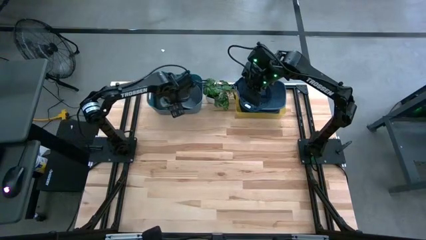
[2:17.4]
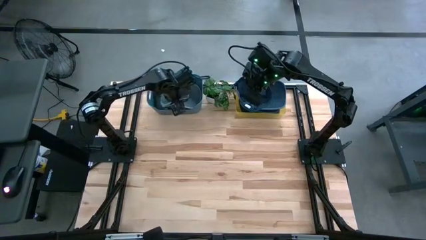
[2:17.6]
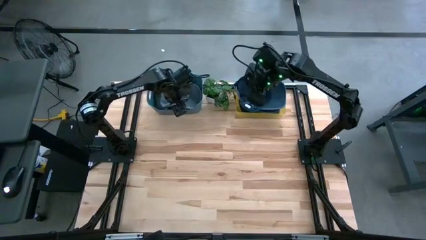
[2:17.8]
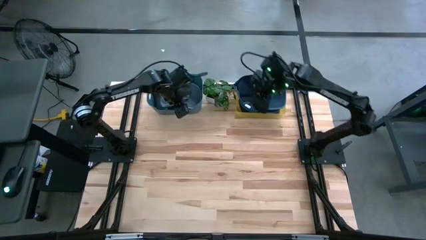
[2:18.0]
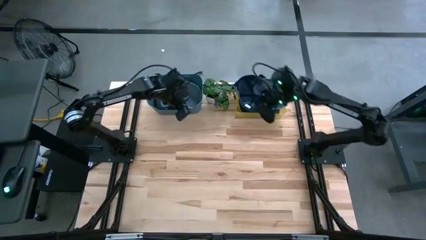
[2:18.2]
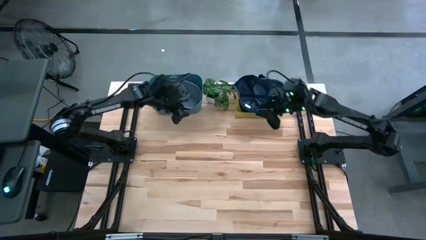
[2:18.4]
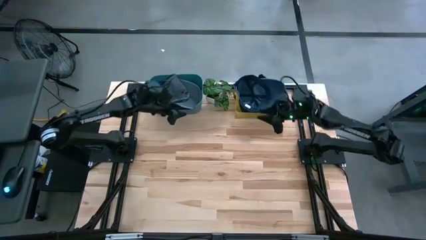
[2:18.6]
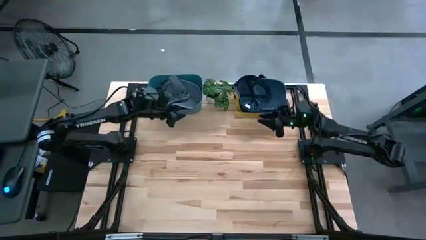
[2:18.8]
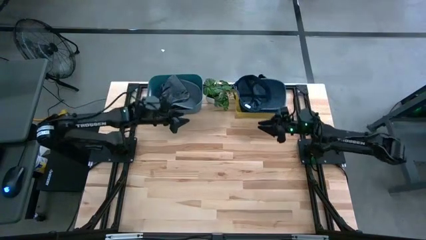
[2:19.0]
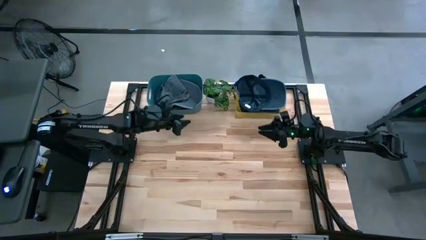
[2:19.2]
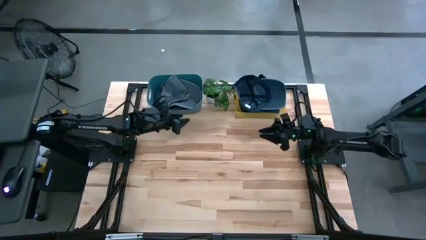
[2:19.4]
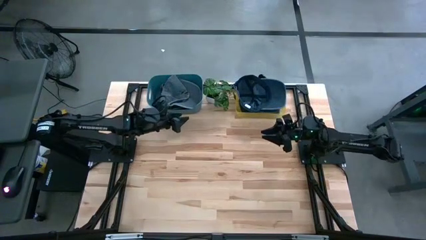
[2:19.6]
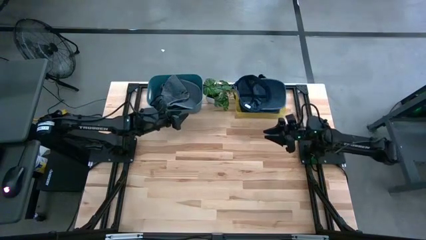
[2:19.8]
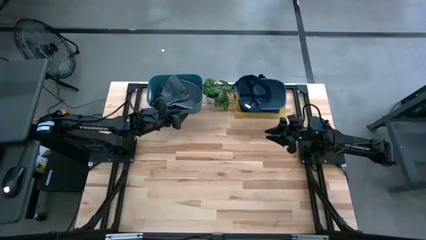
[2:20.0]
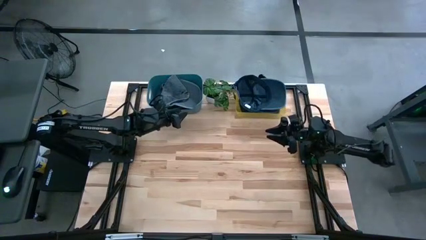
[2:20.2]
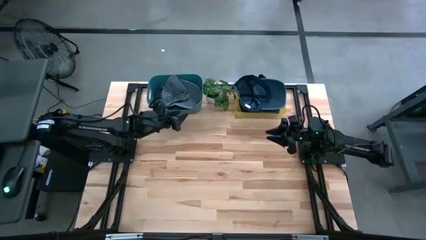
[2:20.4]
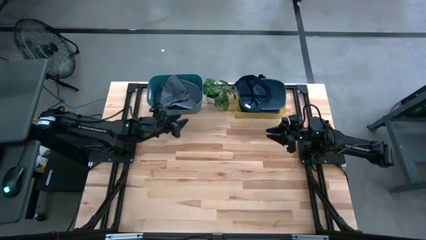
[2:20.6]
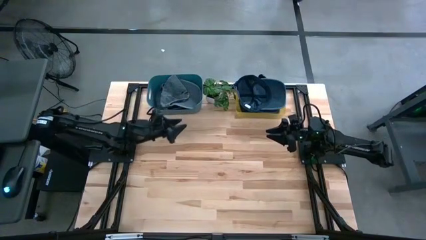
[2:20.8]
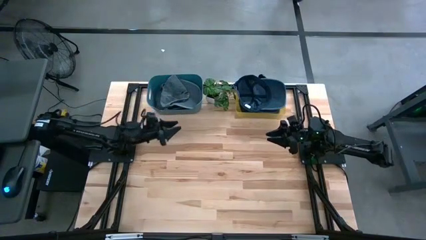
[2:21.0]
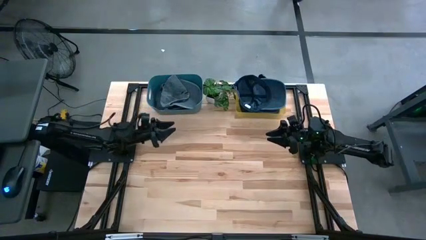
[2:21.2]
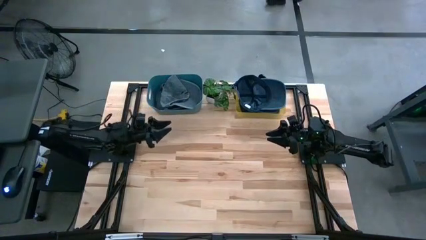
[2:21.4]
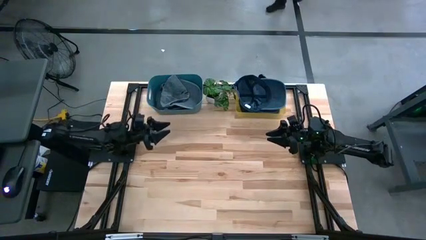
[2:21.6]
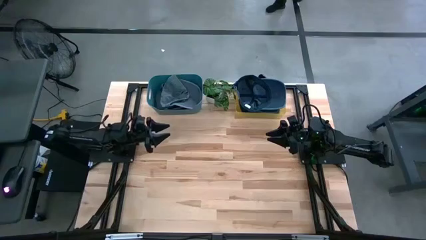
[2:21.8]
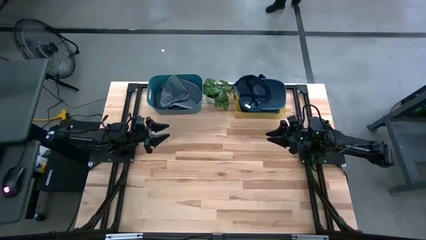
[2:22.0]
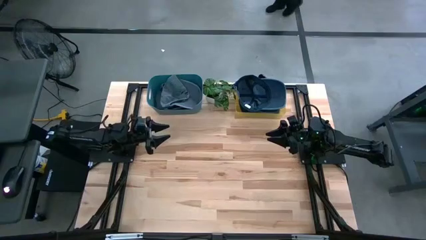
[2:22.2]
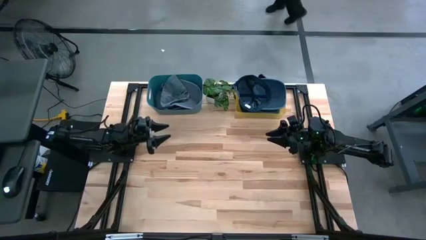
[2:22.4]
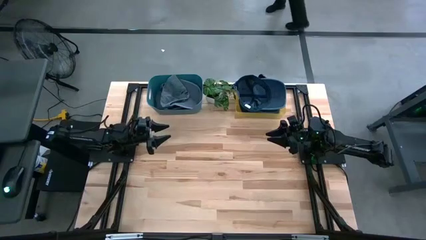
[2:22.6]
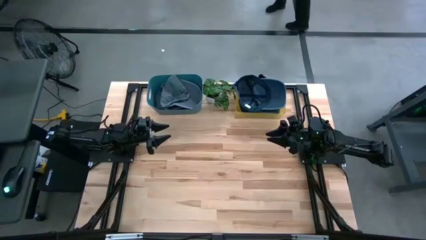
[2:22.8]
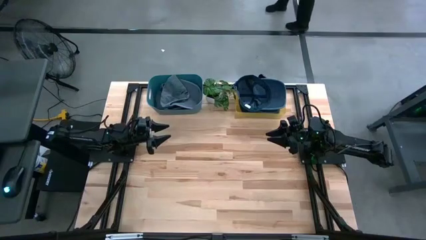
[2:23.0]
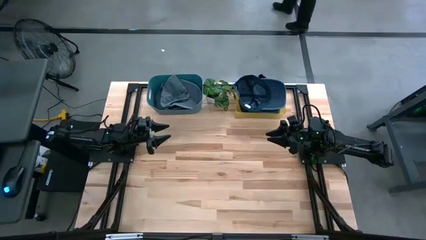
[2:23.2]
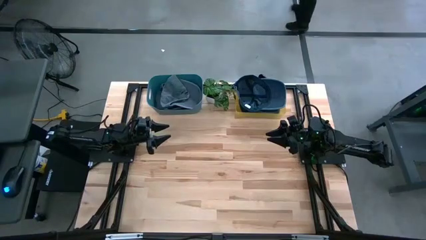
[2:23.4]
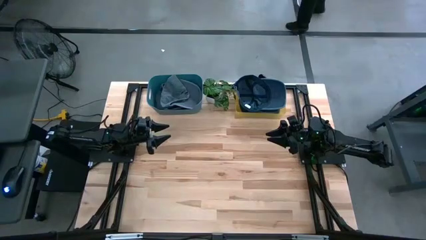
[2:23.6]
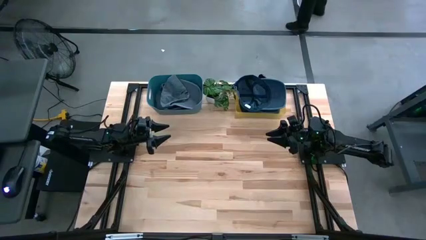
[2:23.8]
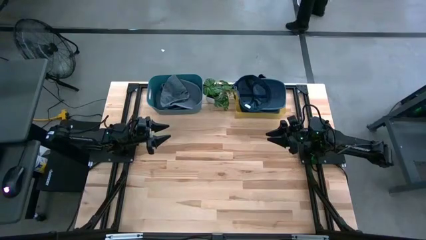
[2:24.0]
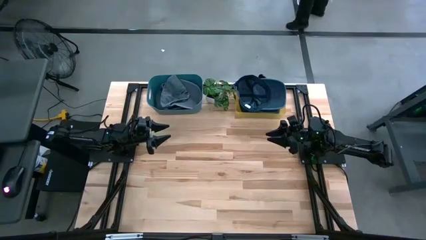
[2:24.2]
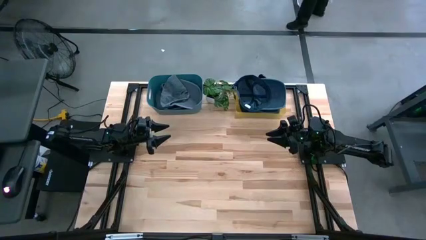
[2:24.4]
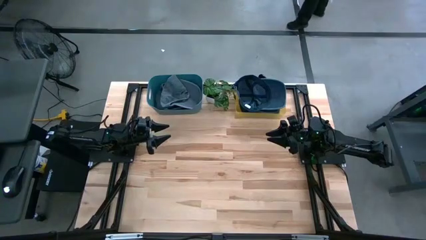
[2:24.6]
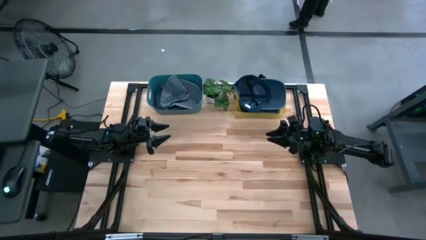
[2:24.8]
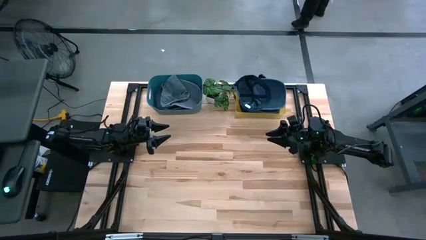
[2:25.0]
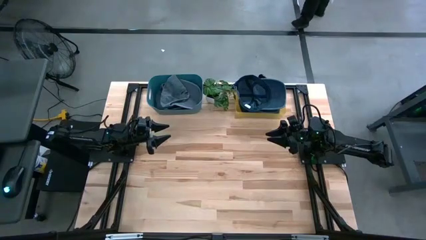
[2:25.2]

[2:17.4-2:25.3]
Task: Pick & Place hat
Return to Home Position

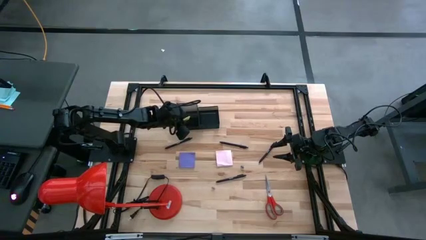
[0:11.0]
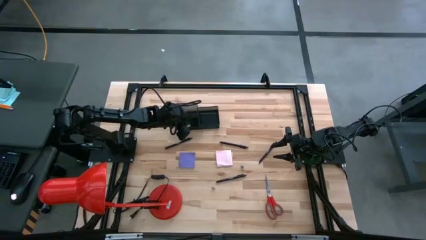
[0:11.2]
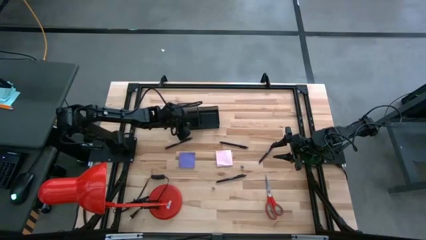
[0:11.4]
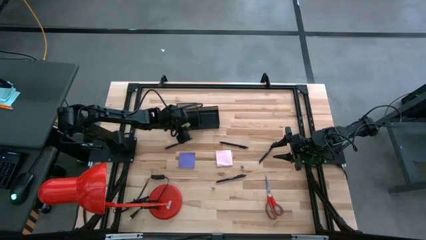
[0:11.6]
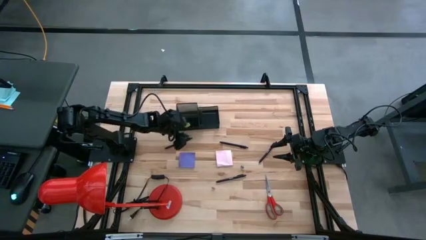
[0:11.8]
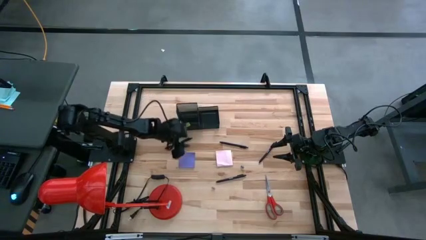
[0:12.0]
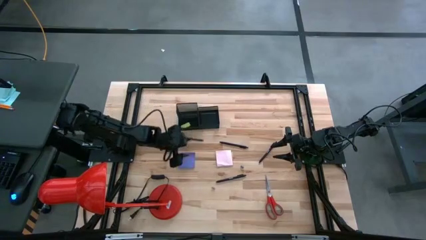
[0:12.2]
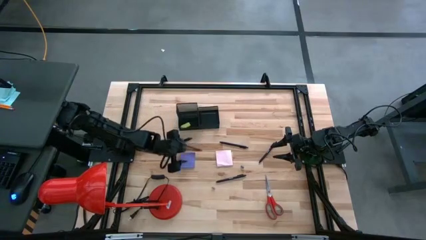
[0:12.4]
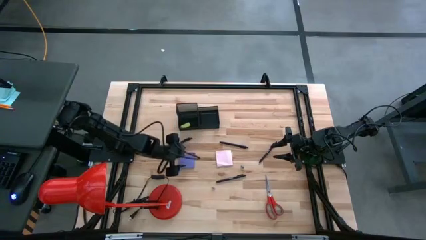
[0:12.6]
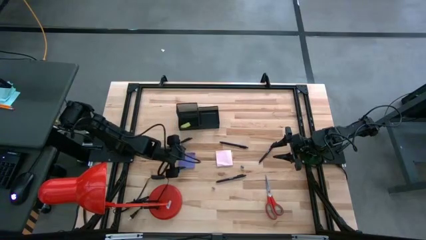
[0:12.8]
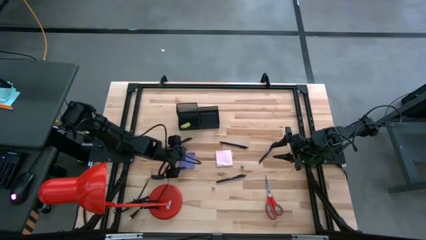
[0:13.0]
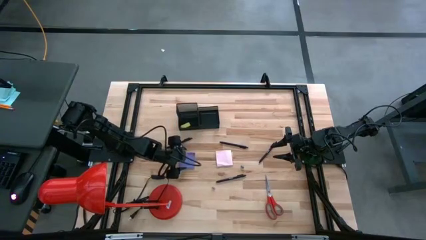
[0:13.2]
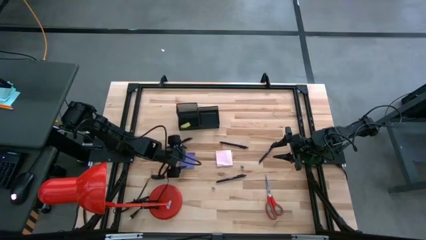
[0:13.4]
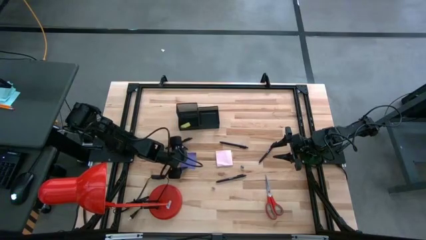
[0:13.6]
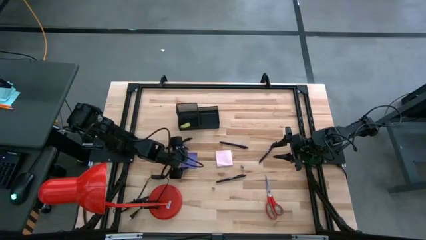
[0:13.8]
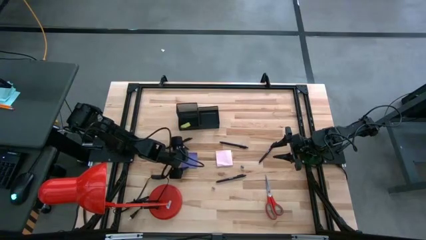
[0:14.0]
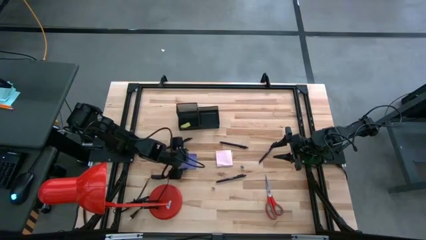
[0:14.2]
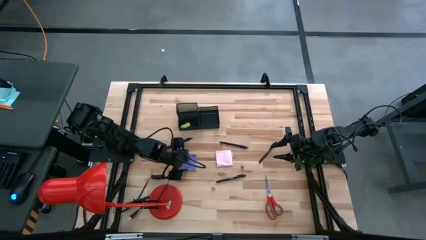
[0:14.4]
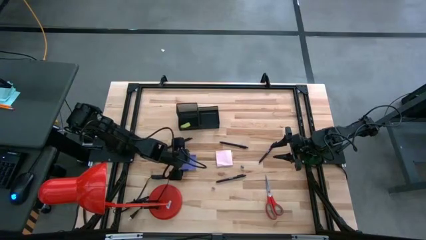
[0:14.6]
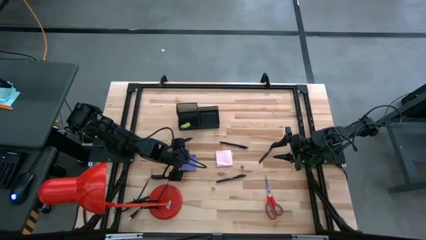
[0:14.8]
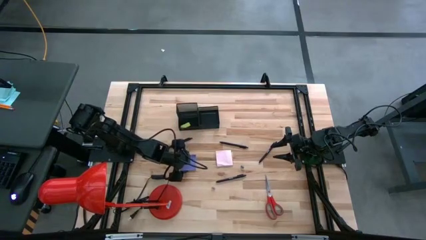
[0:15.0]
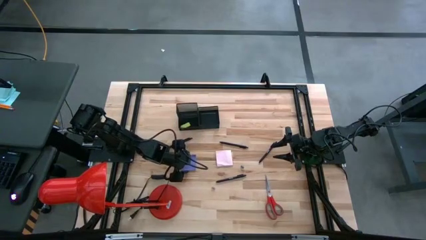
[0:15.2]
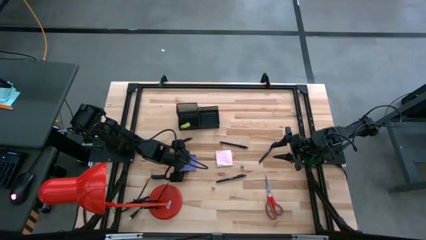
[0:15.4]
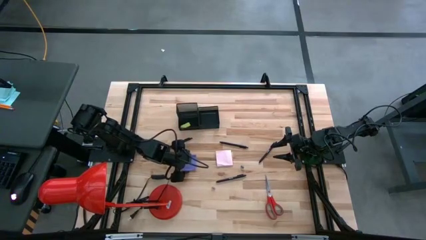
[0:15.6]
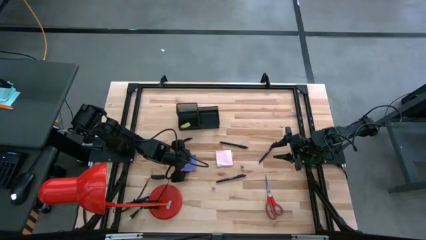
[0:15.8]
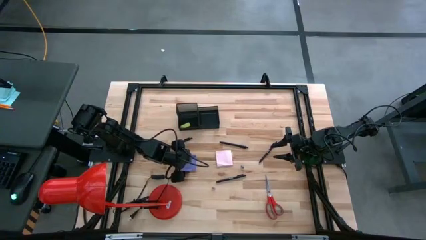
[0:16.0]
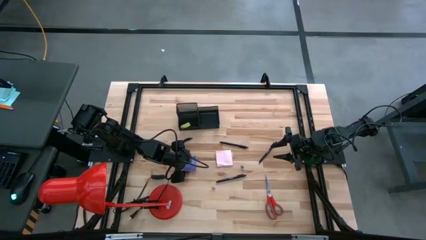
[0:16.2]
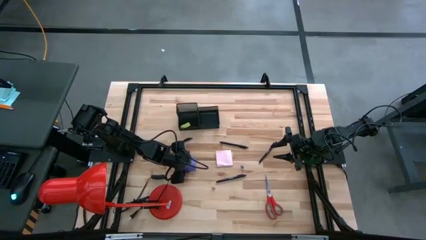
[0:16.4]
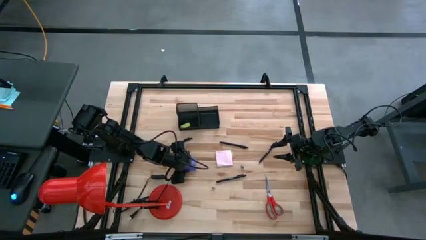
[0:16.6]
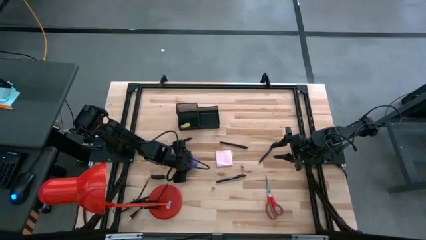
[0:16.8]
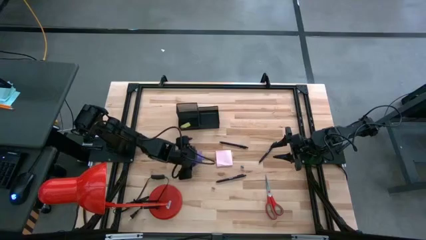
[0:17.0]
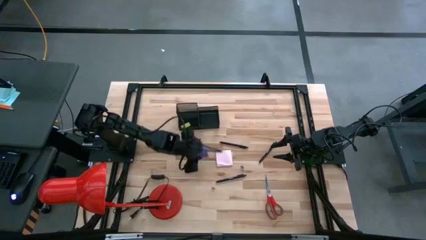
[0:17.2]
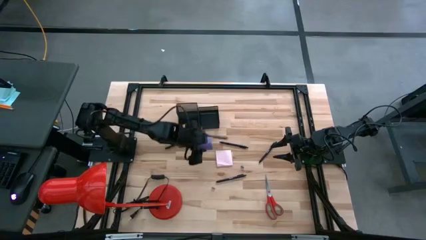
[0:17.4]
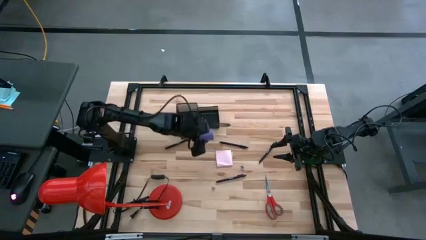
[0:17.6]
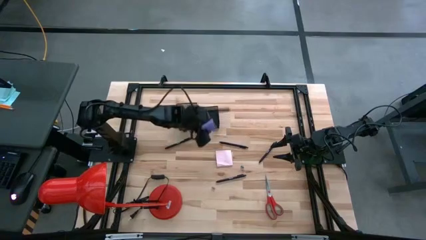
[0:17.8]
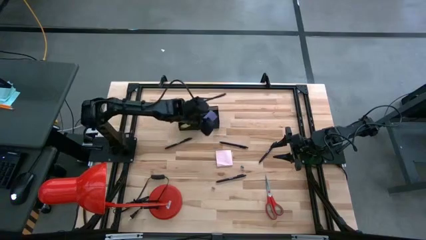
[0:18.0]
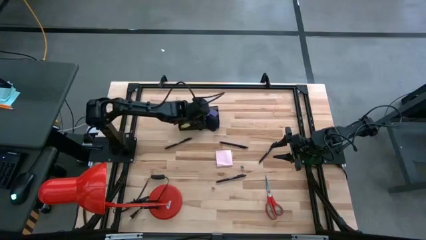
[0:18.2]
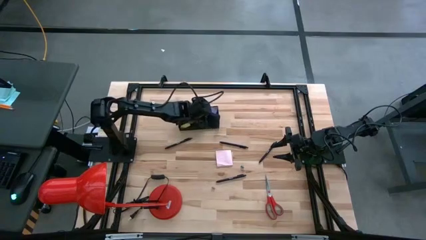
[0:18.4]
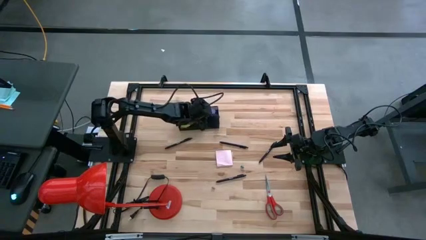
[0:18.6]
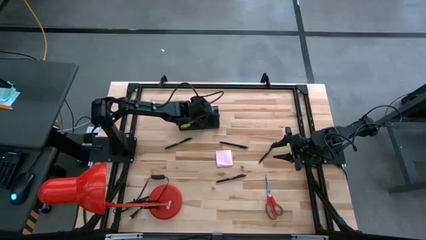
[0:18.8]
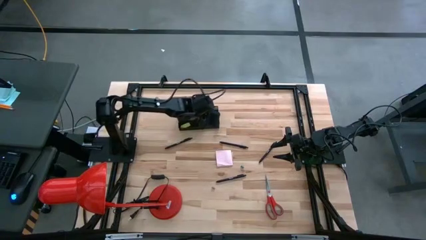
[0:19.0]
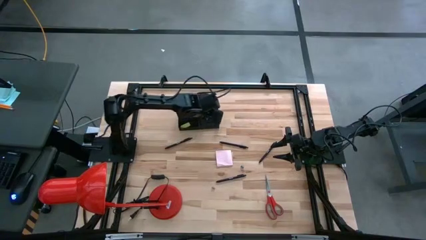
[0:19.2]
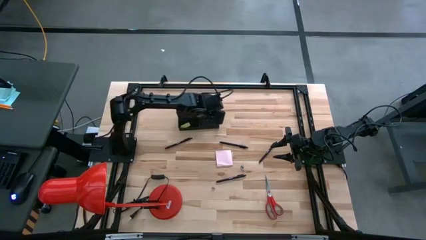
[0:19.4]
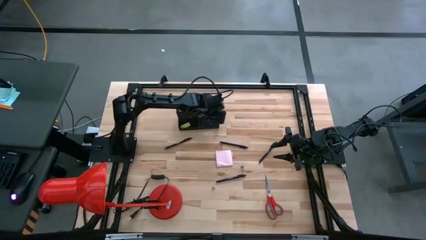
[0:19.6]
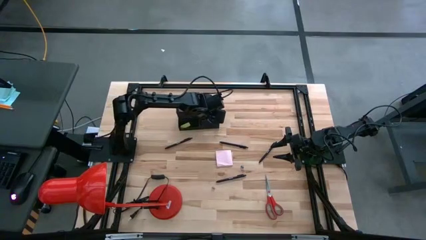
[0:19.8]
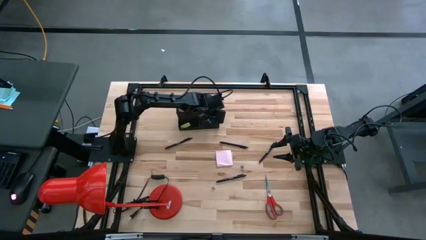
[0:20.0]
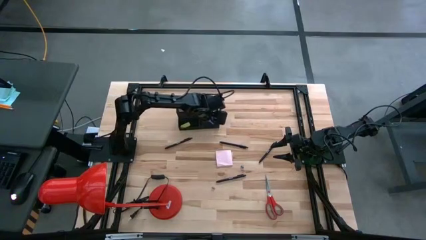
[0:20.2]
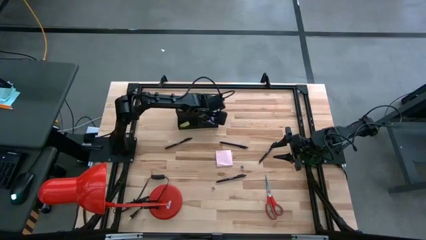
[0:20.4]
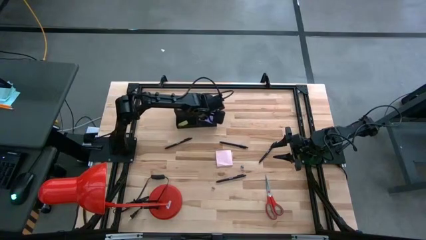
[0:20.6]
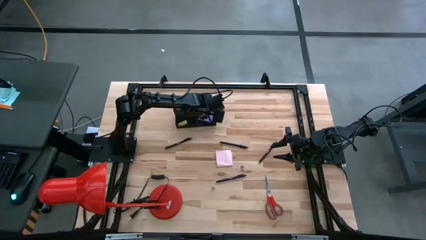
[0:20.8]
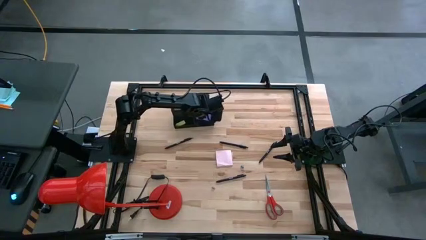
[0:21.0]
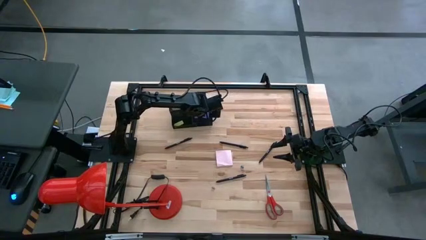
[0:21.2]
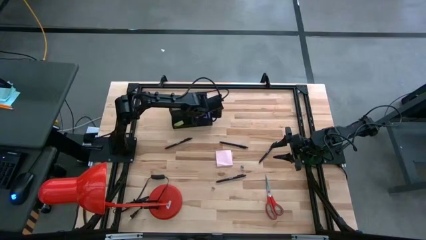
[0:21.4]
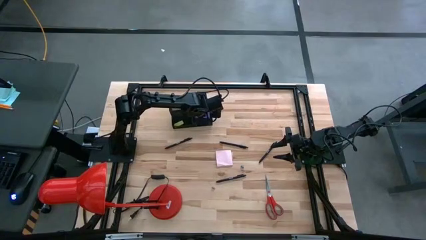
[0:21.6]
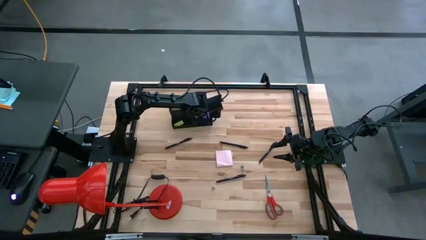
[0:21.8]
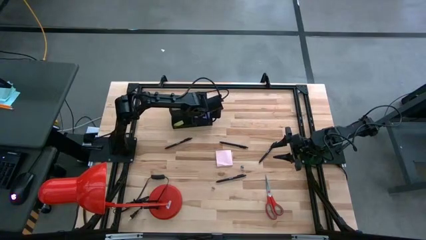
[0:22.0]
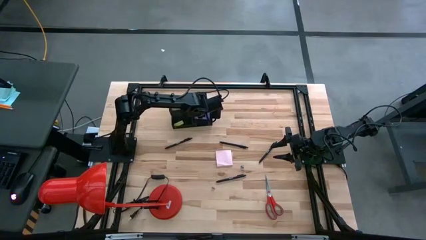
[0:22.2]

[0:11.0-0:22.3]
Task: Pick and place office supplies into organizer
Put the purple sticky note into the desk organizer
